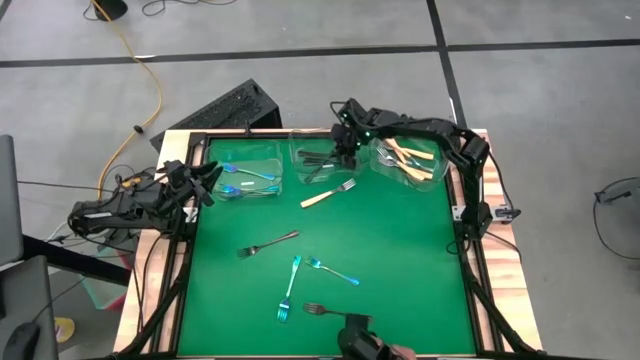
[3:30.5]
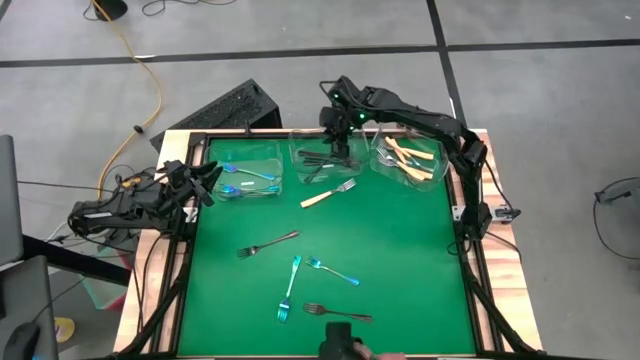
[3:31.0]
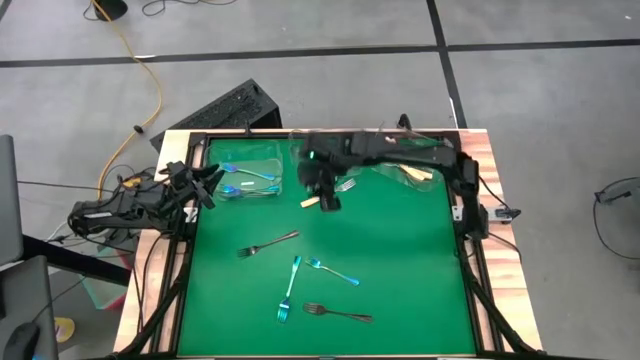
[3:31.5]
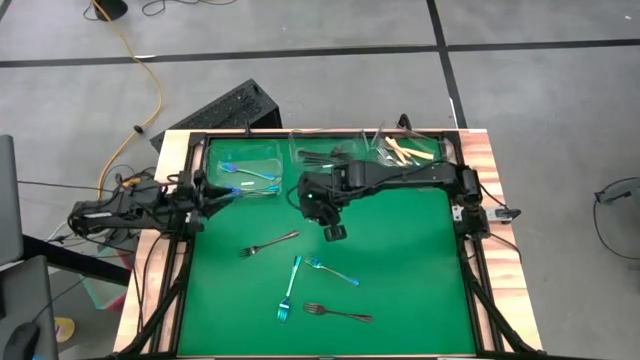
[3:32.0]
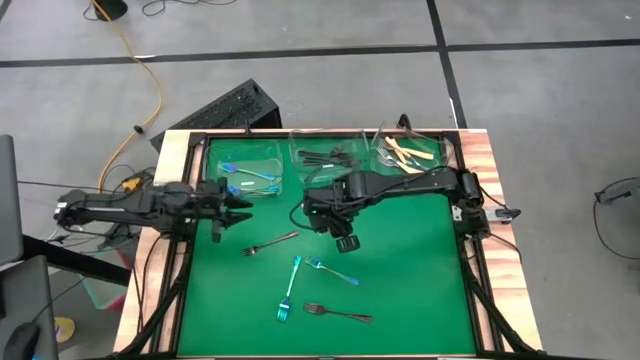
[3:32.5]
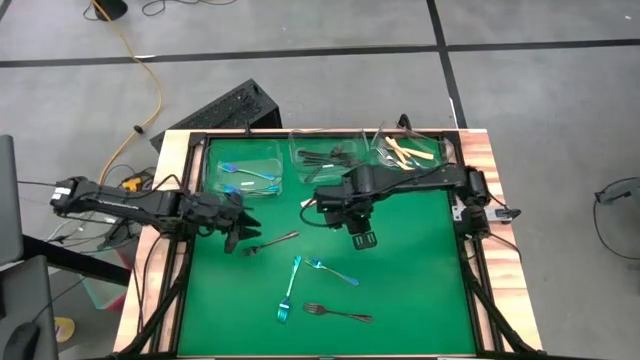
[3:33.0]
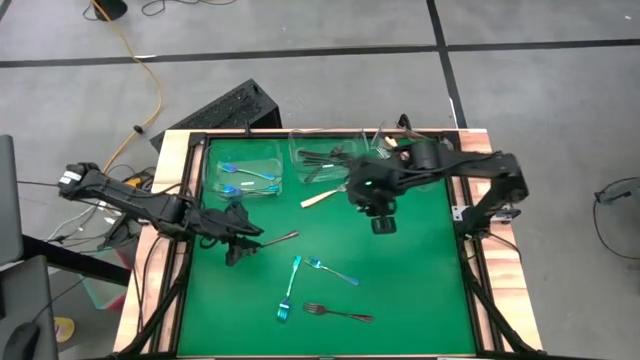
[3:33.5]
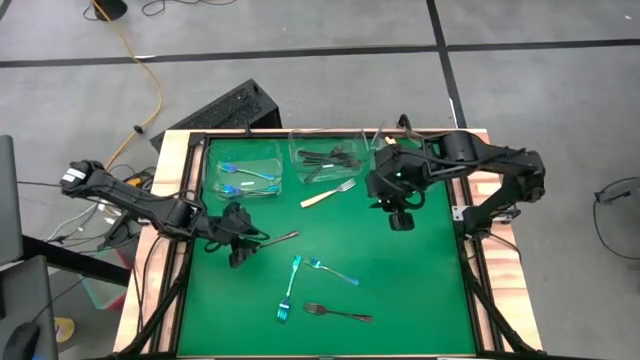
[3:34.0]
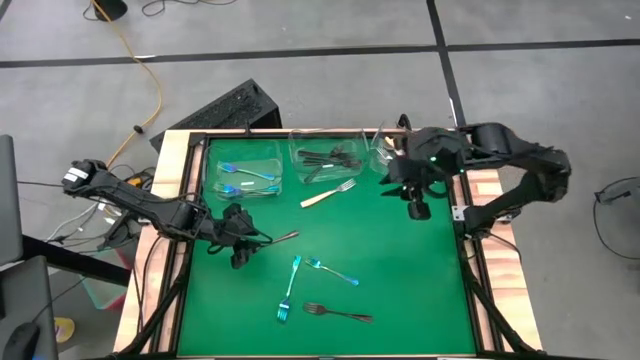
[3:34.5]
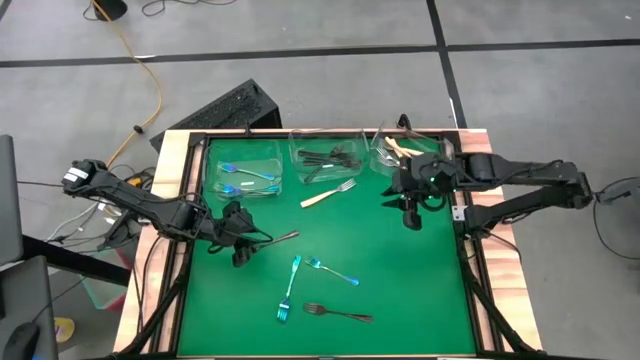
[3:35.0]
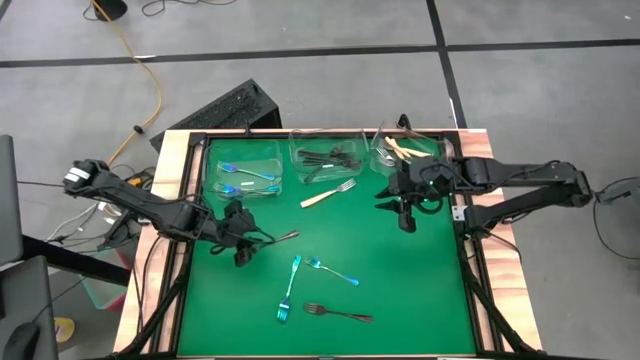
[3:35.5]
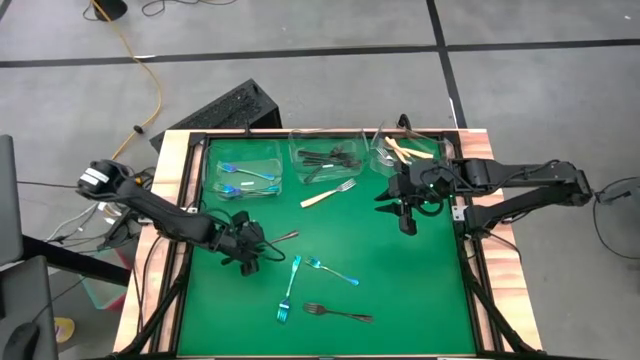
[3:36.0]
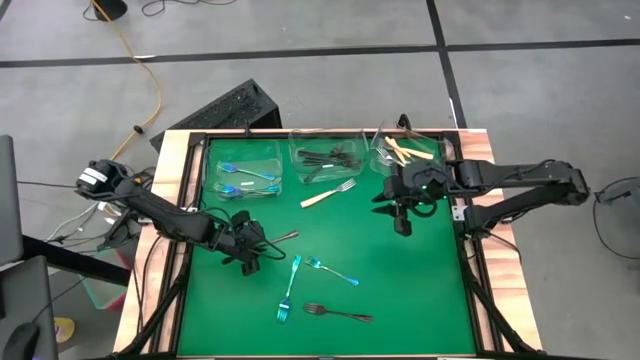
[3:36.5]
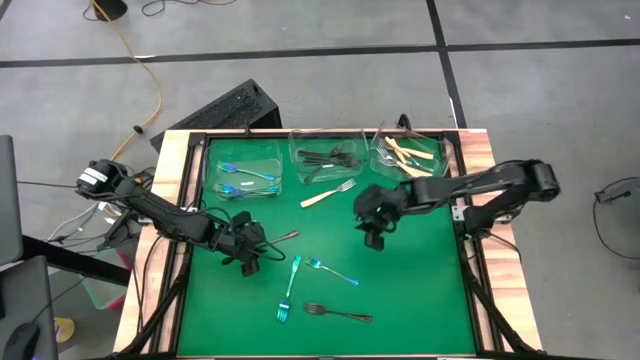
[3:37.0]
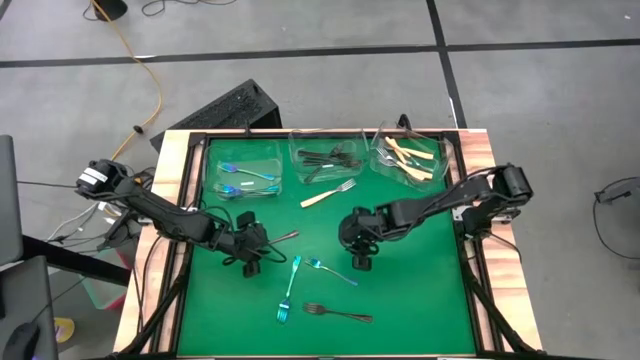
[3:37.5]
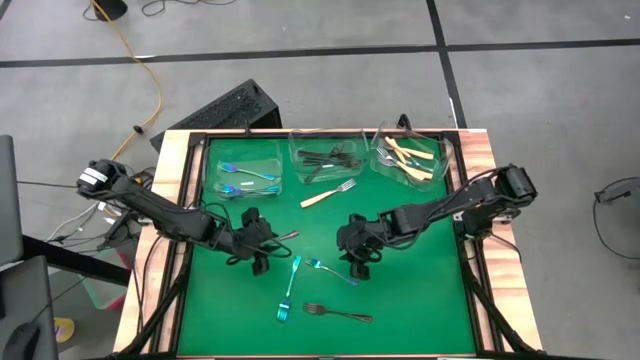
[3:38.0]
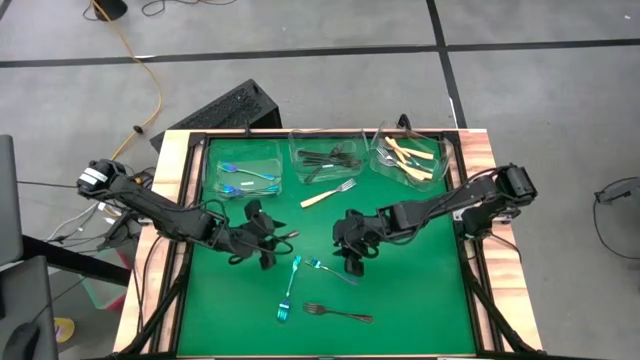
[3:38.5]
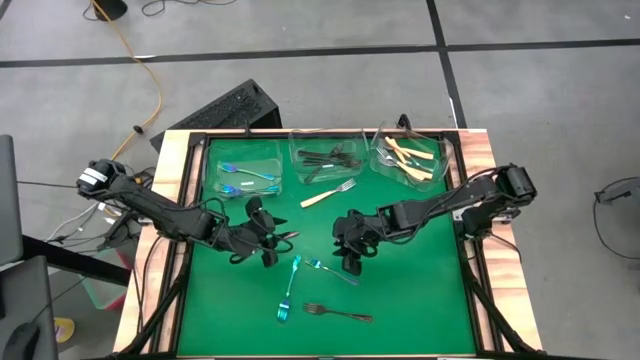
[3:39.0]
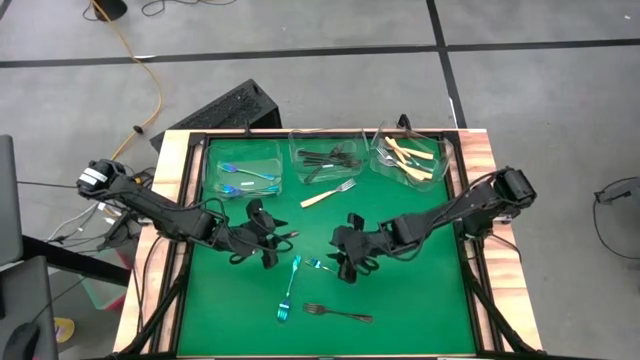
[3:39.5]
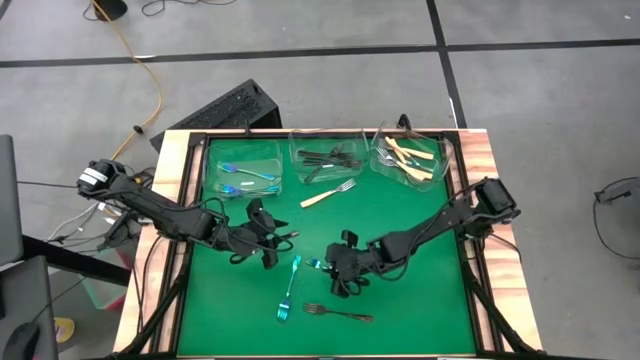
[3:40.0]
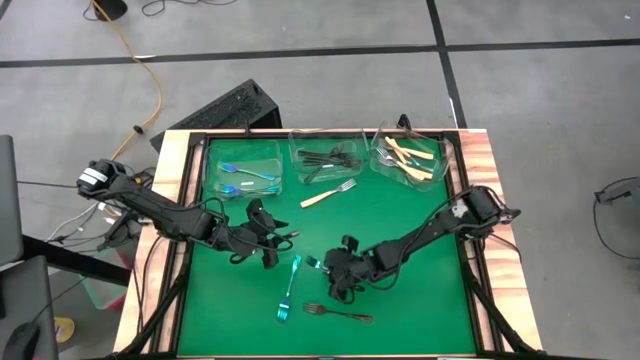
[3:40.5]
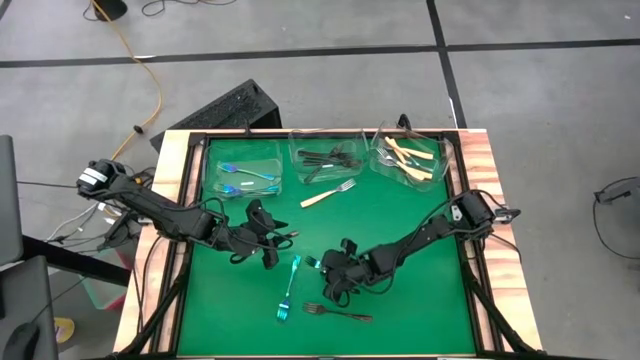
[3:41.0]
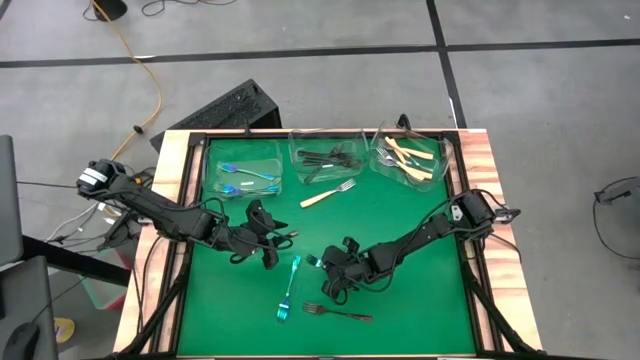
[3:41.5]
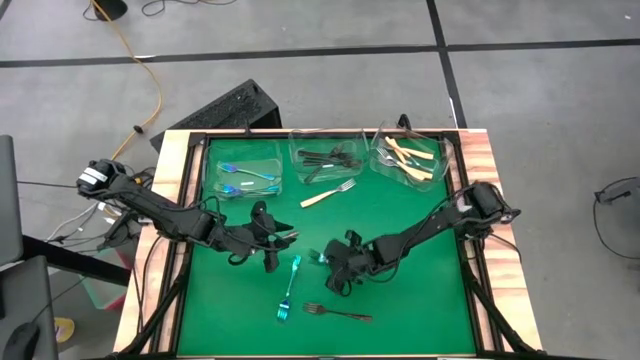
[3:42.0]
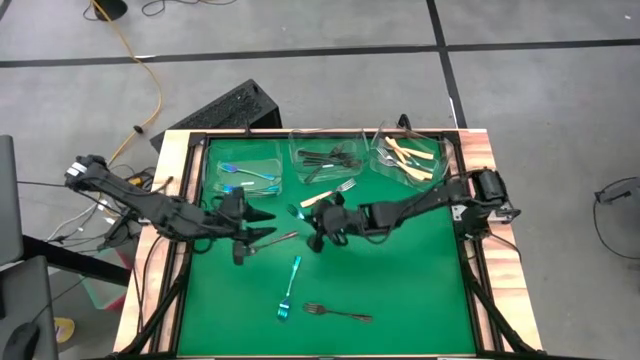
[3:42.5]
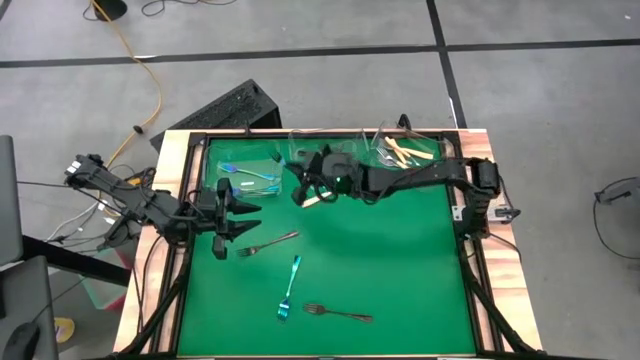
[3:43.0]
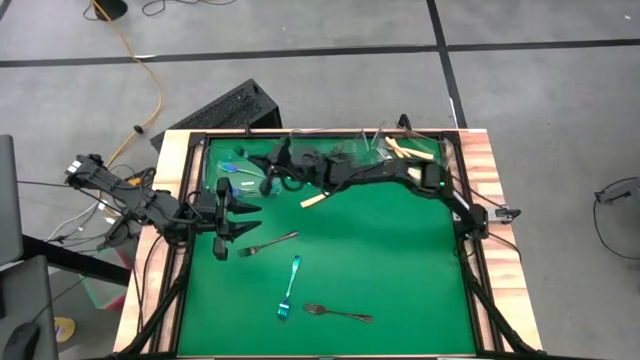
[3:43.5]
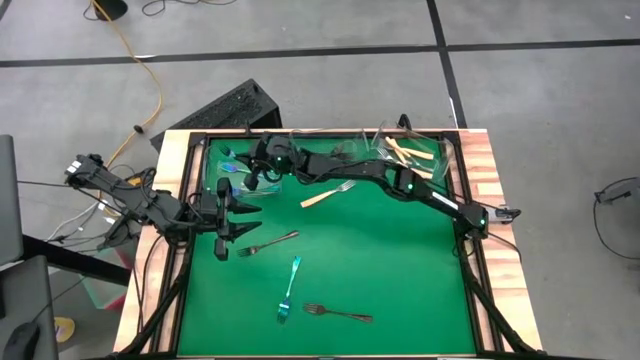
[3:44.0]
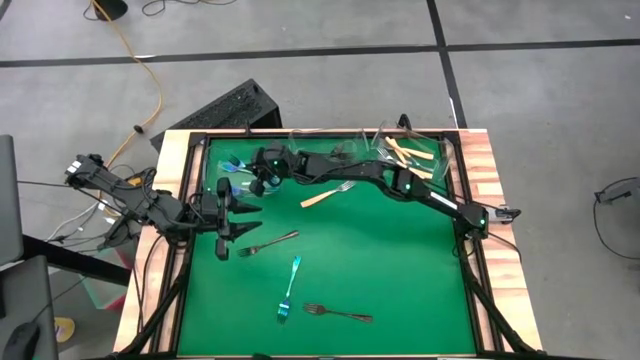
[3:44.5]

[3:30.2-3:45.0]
Task: Sort silverware by color (type)
Put the blue fork into the left transparent bin

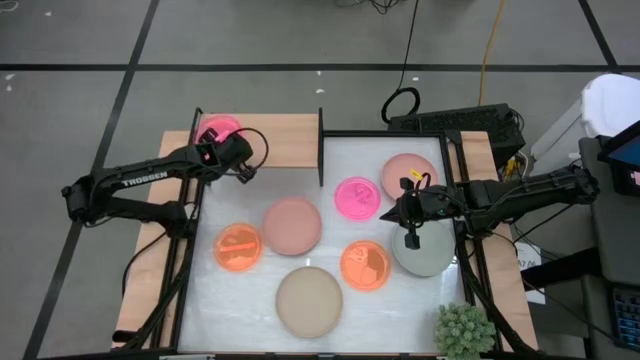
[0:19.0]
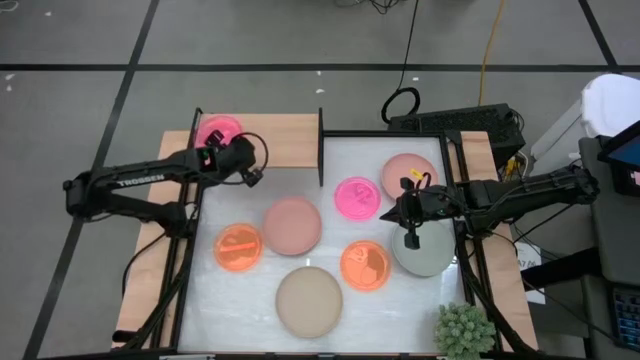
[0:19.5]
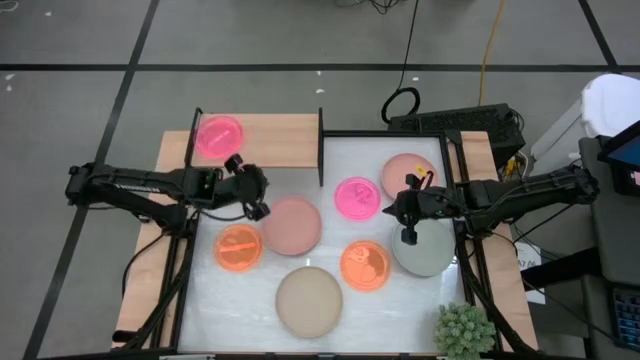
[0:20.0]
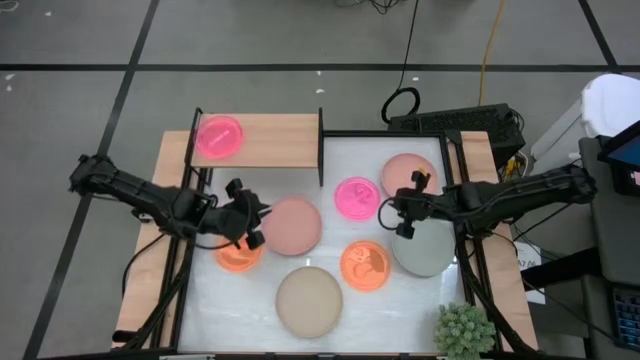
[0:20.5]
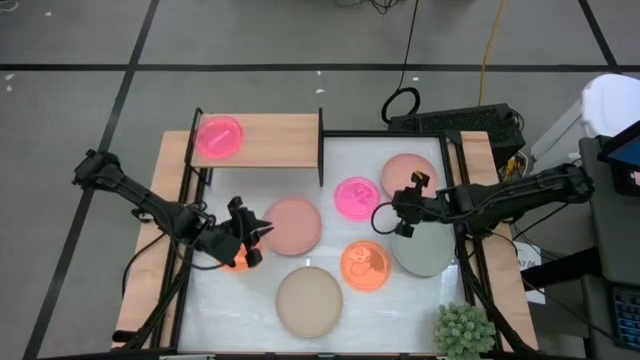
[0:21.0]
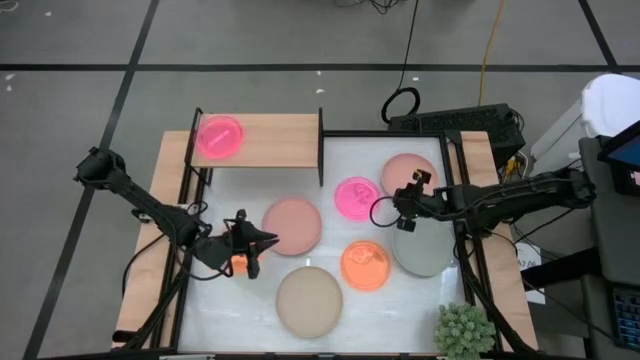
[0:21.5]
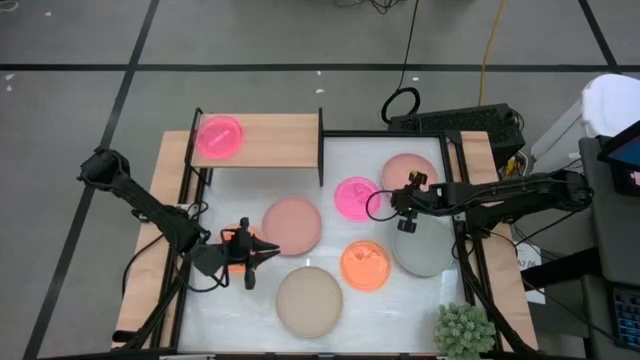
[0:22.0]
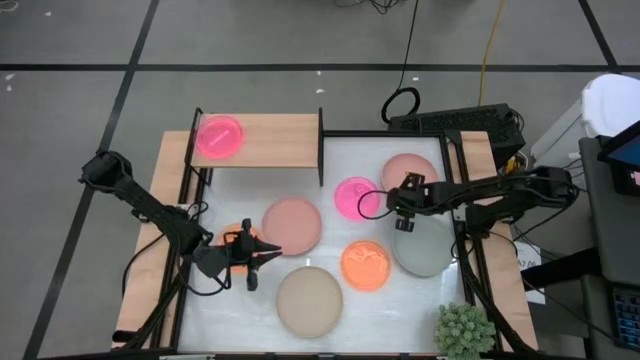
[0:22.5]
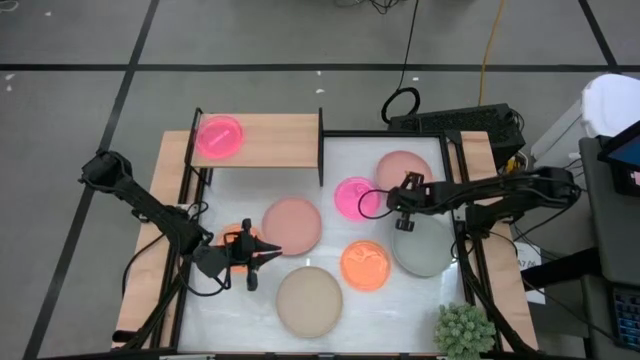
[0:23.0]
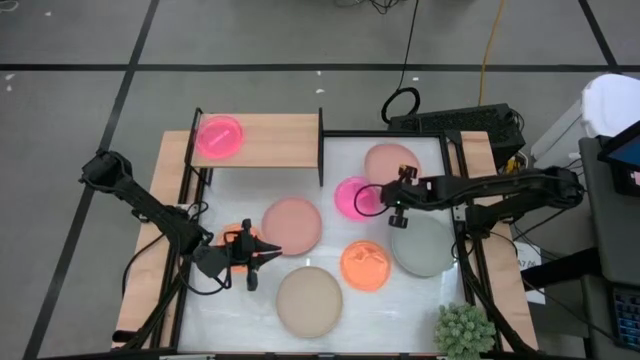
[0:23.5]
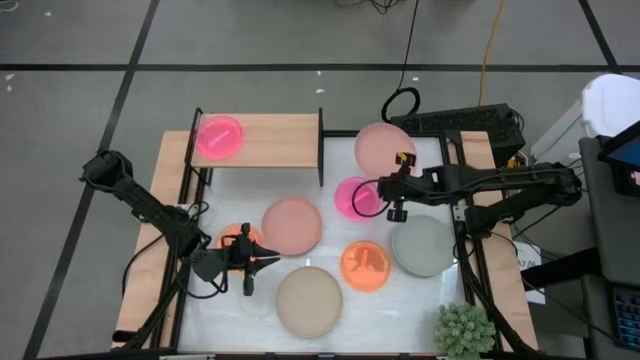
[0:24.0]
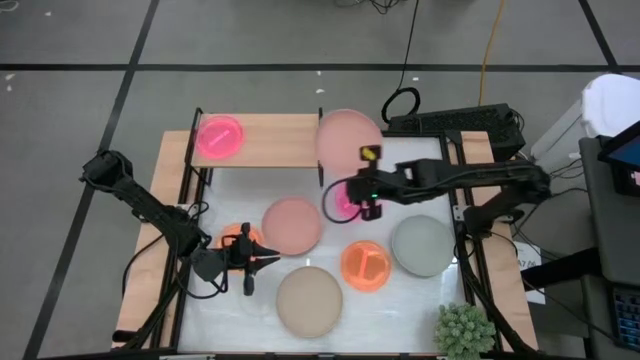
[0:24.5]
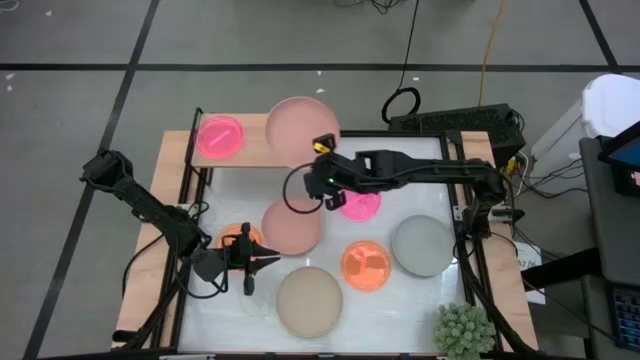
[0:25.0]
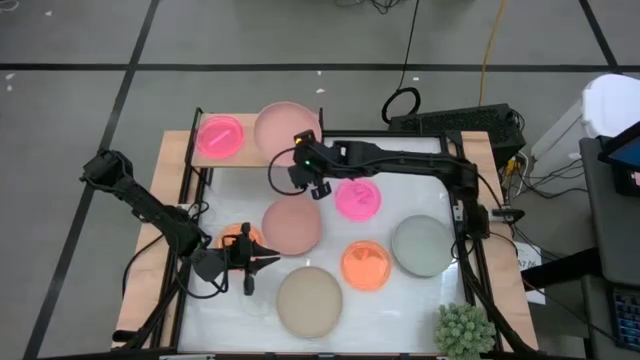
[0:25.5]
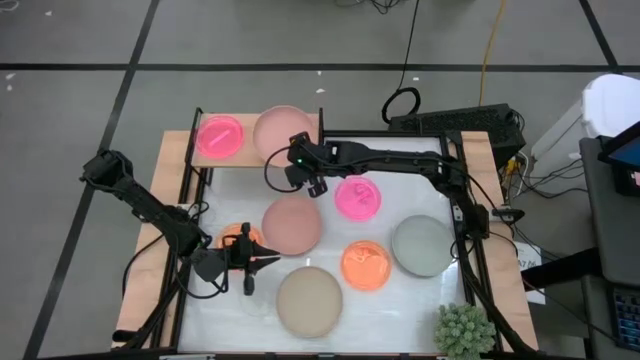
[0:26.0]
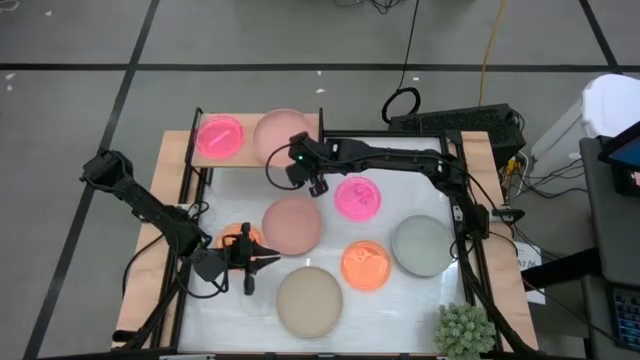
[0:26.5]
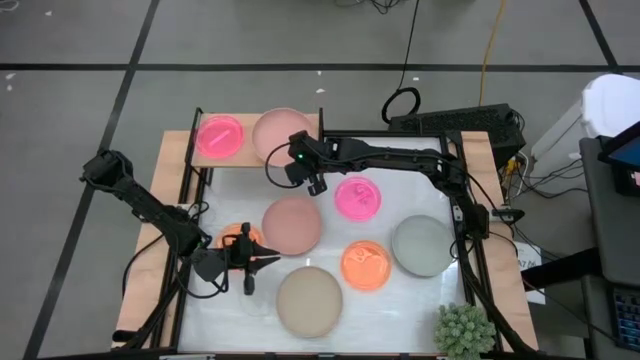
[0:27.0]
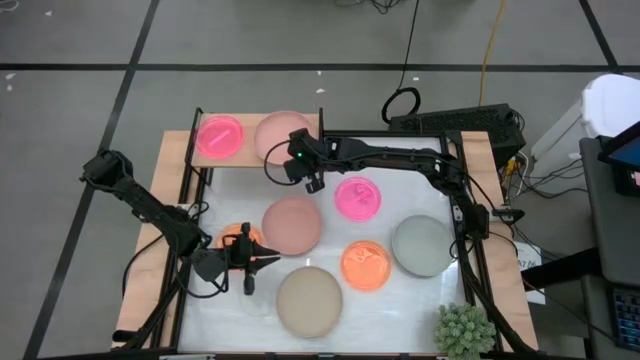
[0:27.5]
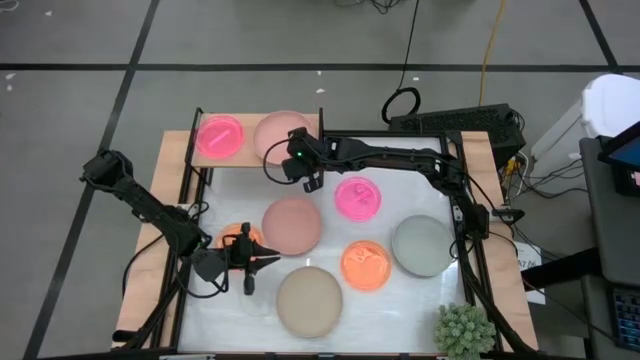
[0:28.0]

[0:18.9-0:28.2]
Task: Place and stack plates onto a shelf
Put the top big light orange plate on the shelf
